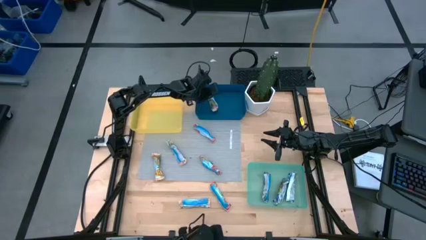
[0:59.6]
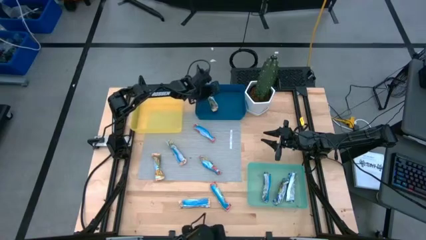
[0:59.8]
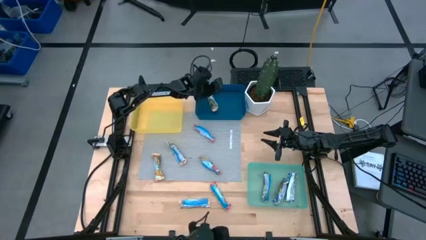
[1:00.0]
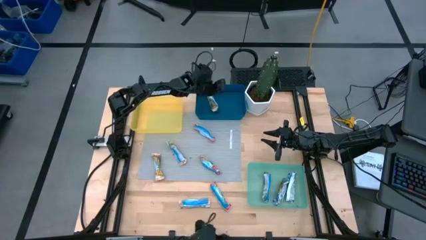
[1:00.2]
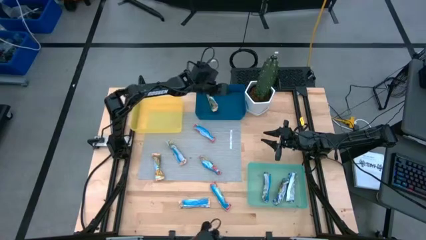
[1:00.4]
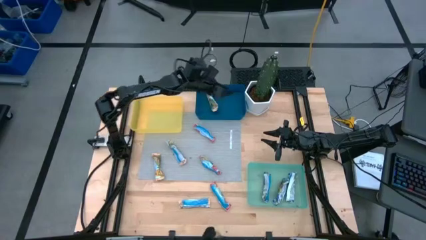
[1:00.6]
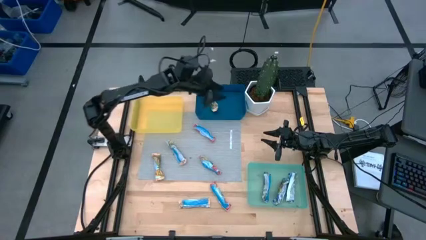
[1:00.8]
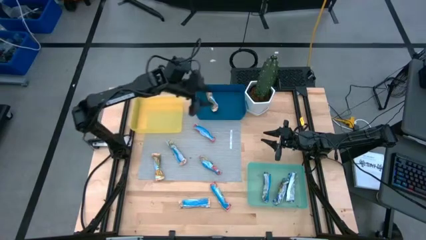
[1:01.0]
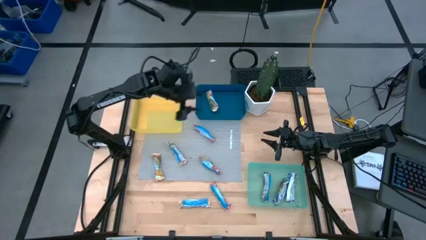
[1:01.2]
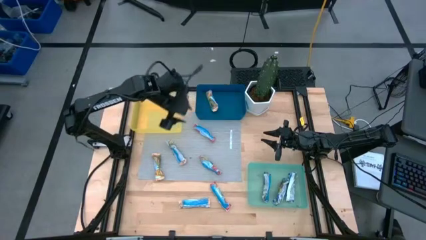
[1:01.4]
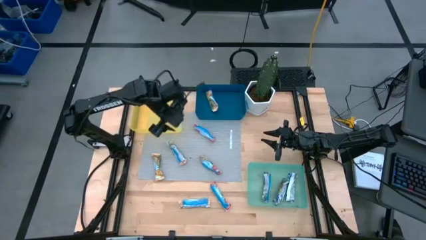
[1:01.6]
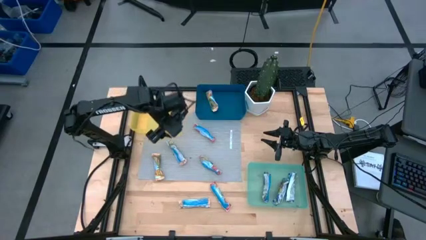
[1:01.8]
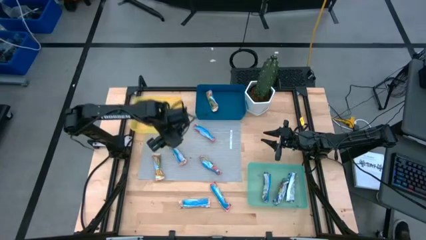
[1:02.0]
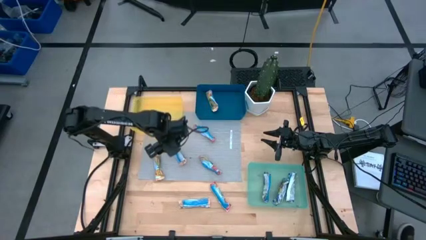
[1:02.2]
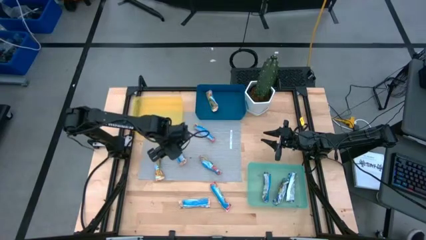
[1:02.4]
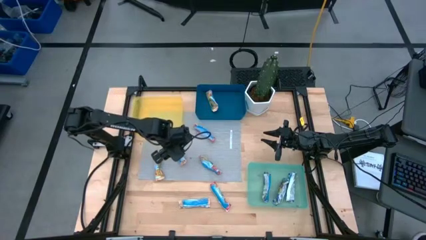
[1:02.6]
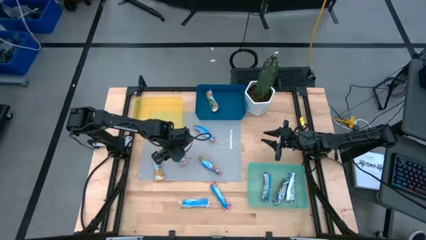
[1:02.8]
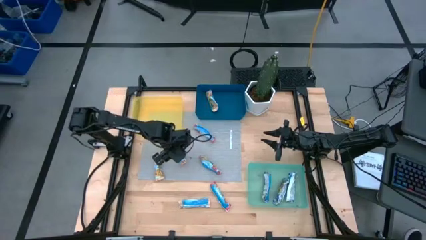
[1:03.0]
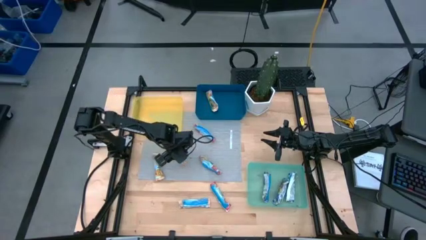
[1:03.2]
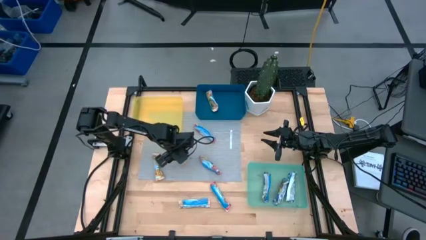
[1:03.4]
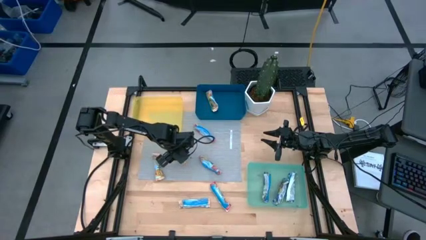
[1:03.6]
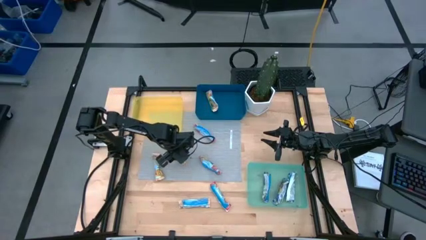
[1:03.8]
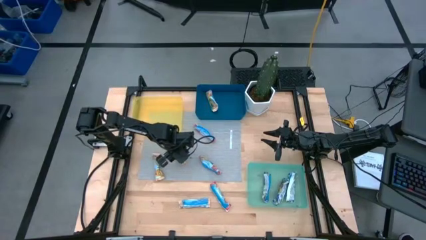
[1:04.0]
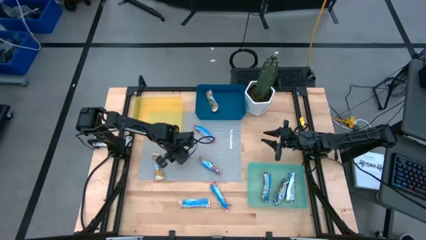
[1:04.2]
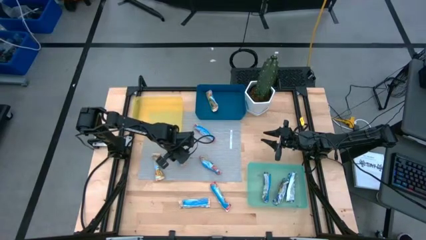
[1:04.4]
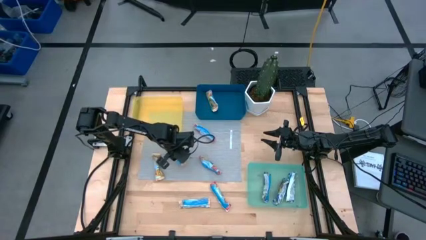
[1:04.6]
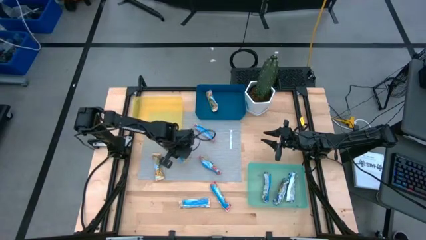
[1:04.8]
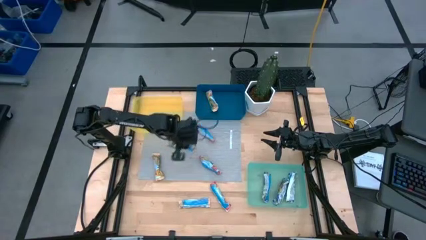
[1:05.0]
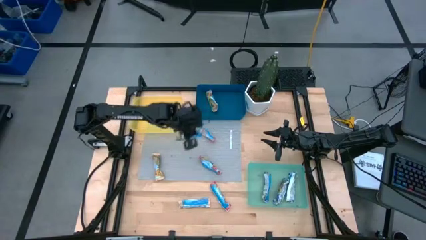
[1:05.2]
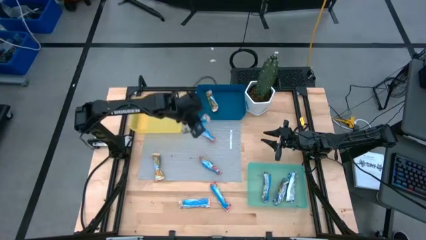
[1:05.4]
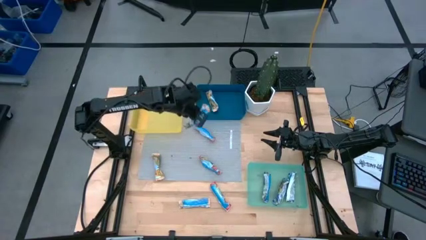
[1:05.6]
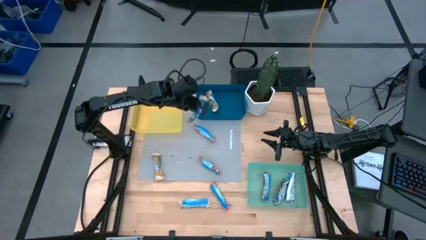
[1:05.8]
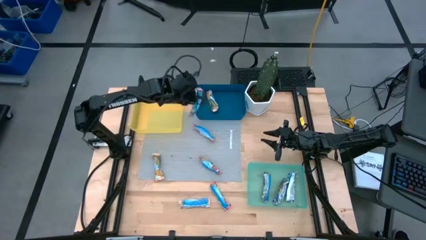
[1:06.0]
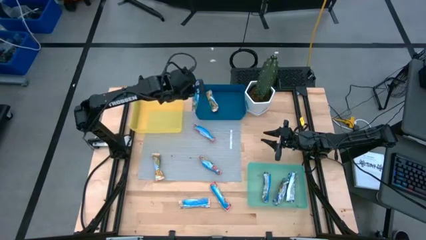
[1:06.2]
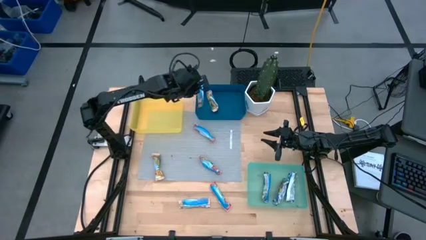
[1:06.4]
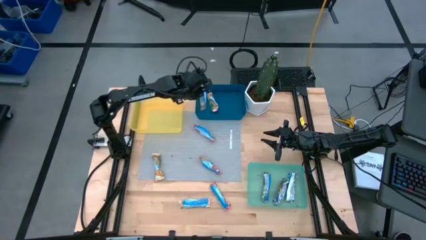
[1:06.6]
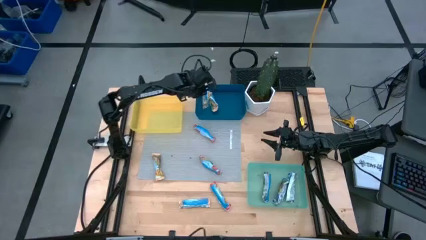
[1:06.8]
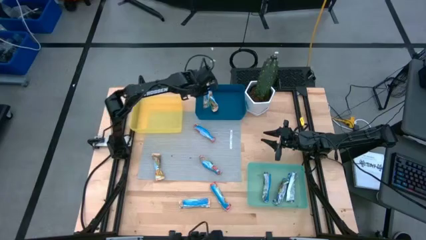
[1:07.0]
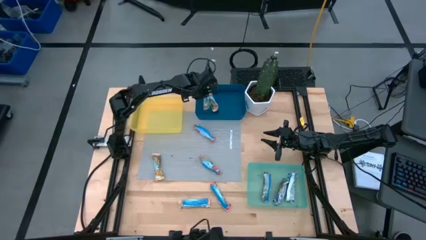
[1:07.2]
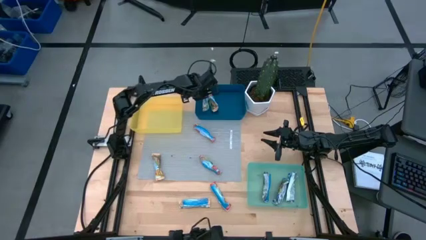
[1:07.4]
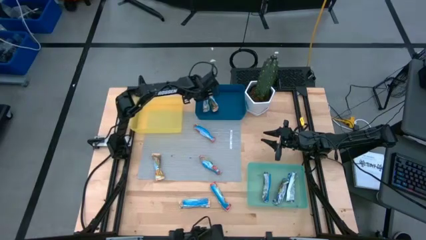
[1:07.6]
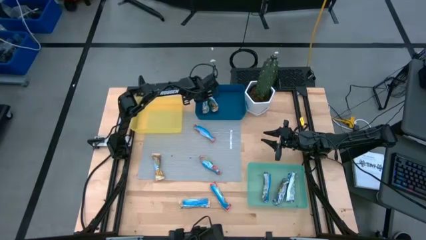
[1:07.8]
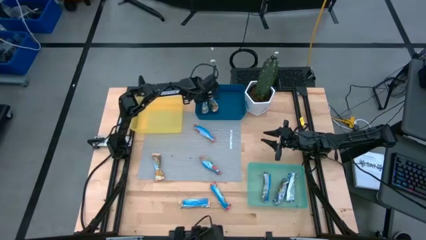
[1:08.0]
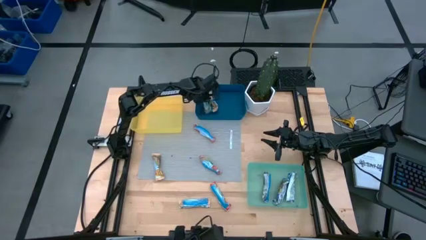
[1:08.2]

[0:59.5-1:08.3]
Task: Pick and place Granola Bars by type
Put the yellow granola bar into the blue bin

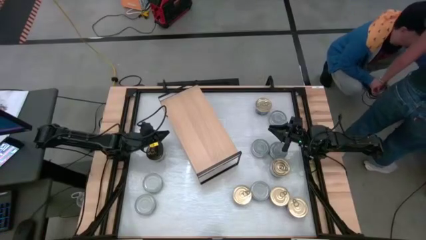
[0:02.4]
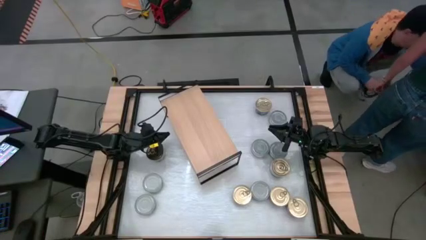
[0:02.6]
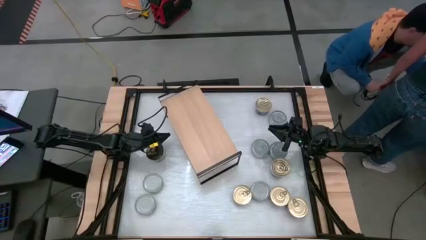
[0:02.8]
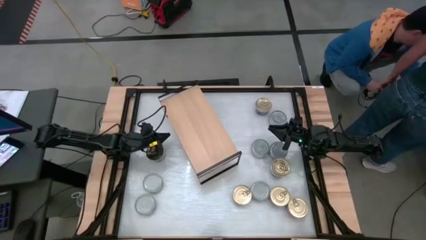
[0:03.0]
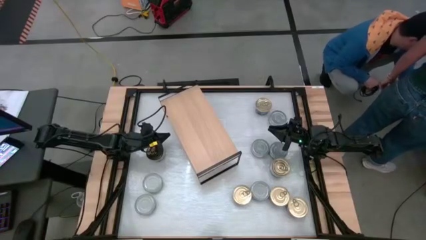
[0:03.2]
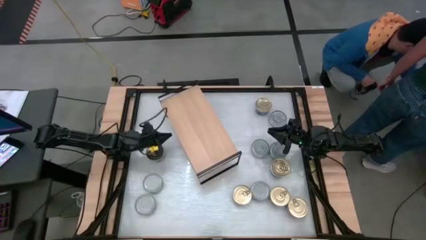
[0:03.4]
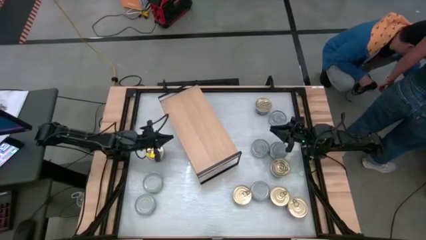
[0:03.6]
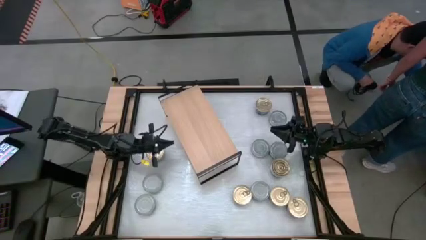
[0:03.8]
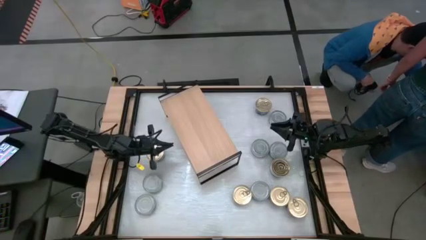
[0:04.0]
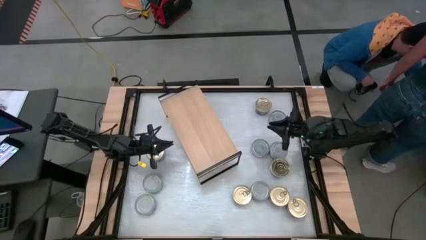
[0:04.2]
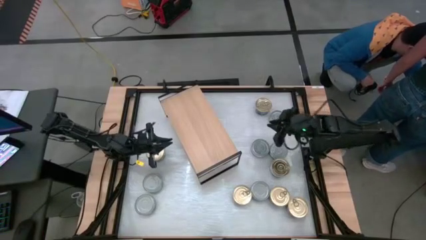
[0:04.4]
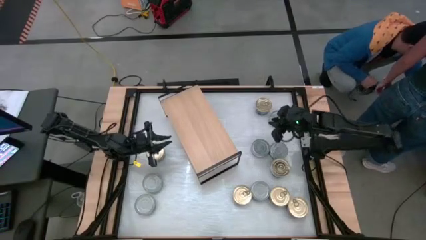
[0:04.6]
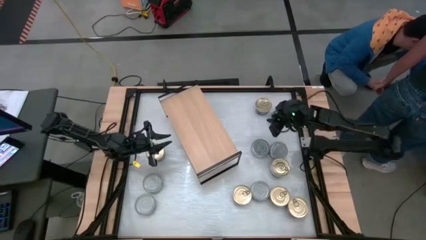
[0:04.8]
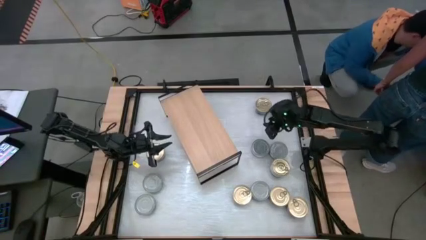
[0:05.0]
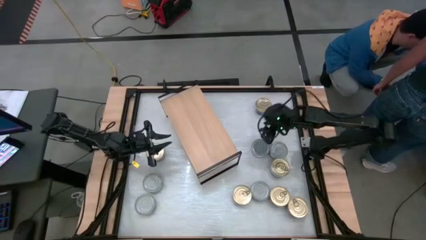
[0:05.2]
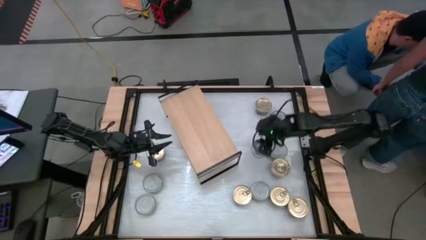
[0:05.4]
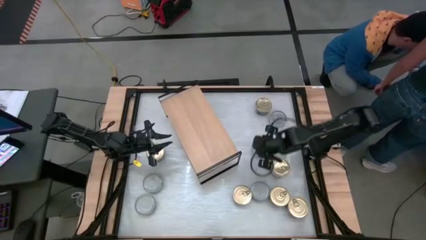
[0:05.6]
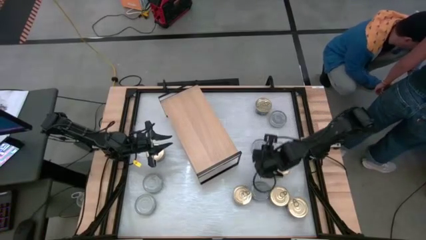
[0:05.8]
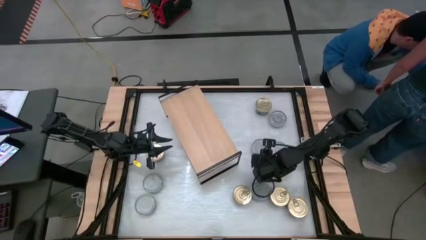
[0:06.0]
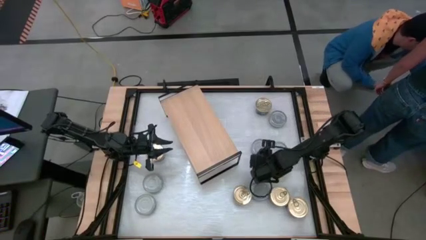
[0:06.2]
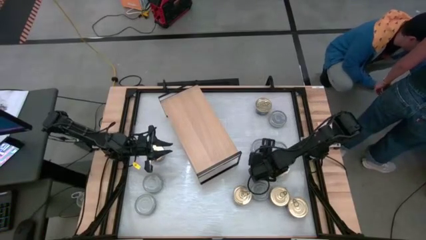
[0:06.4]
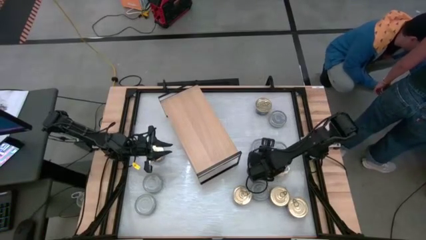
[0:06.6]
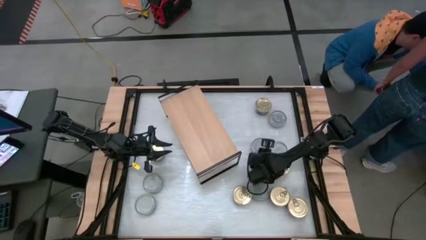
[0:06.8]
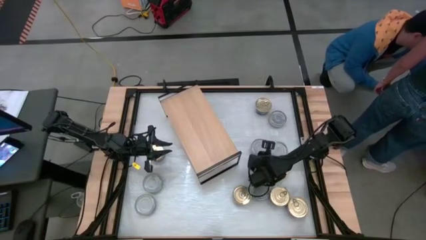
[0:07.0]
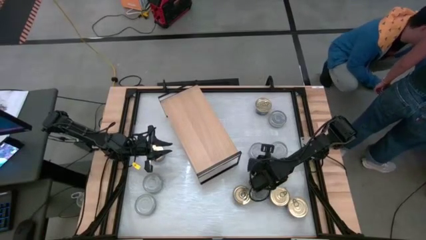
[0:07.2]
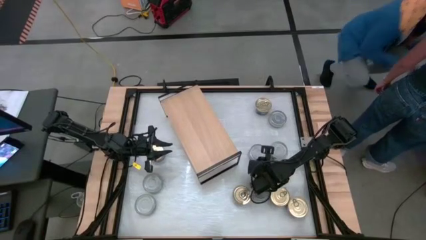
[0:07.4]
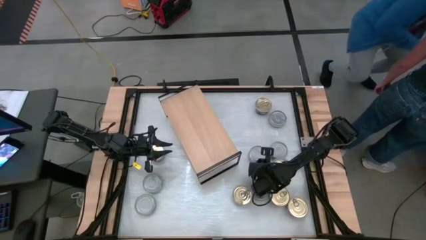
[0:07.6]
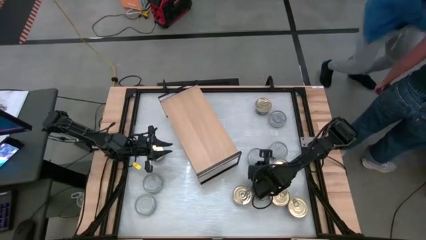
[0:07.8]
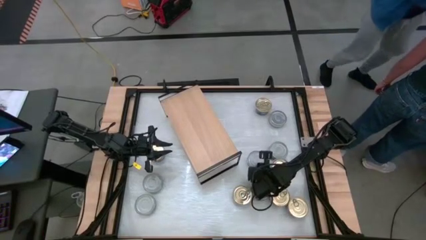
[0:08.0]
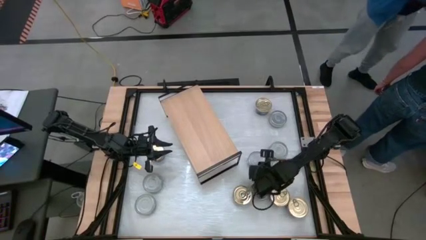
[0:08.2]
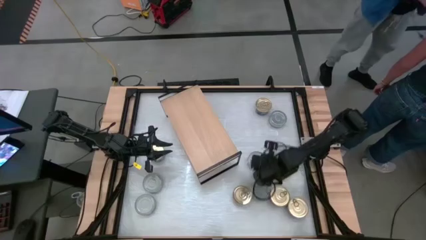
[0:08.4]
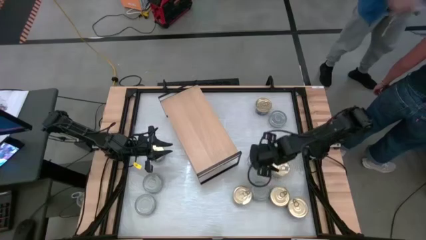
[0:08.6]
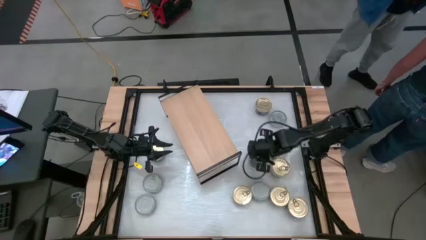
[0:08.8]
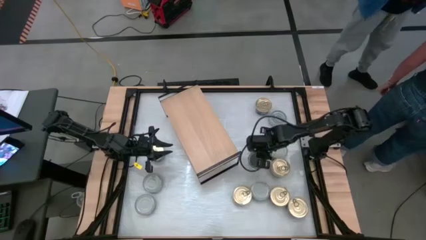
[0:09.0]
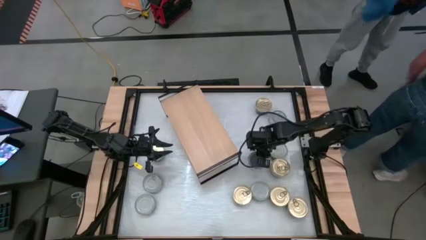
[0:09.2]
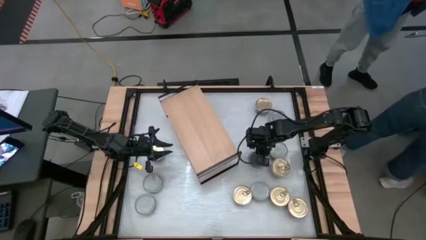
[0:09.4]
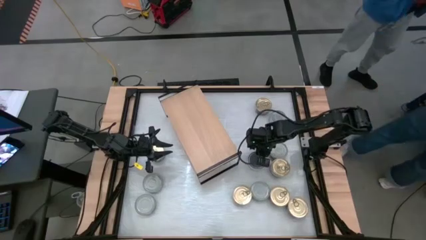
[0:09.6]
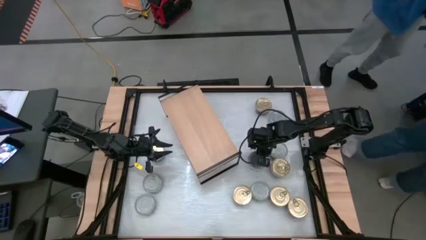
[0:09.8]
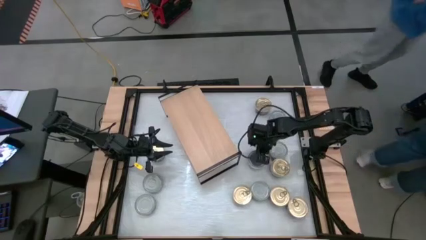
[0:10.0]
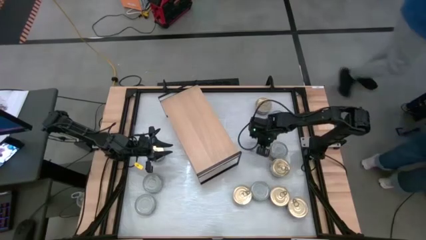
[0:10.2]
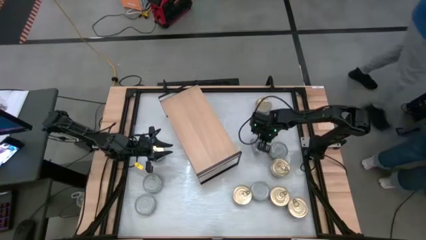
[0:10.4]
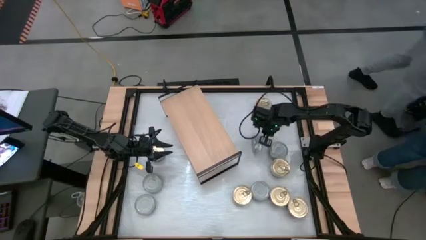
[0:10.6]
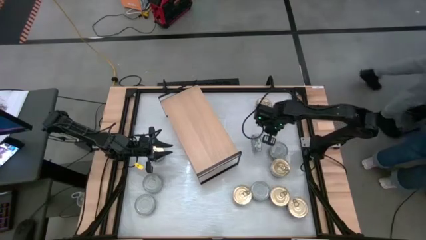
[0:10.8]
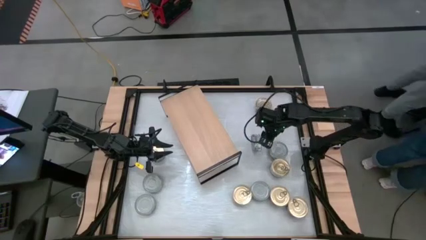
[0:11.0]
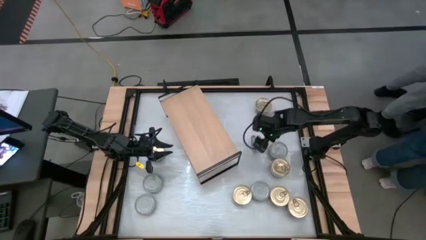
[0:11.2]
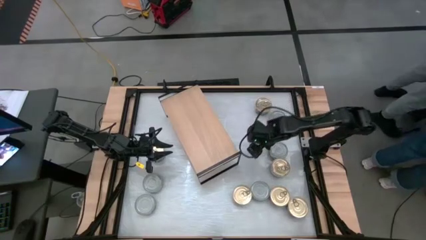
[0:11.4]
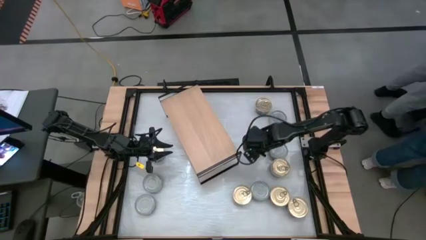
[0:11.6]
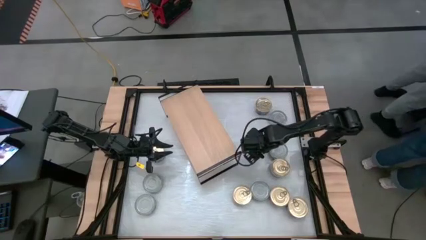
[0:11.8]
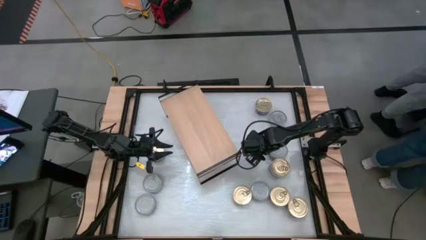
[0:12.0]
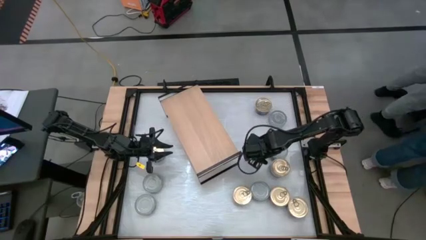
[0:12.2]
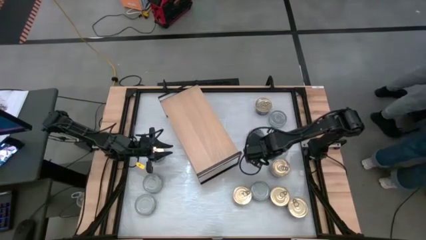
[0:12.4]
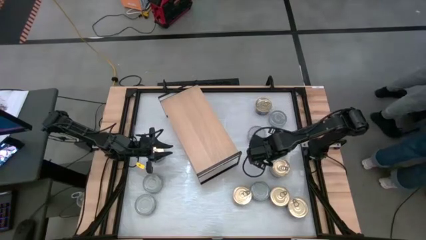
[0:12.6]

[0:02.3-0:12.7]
Task: Stack canned seafood by type on shelf
Put the green tuna can on the shelf
